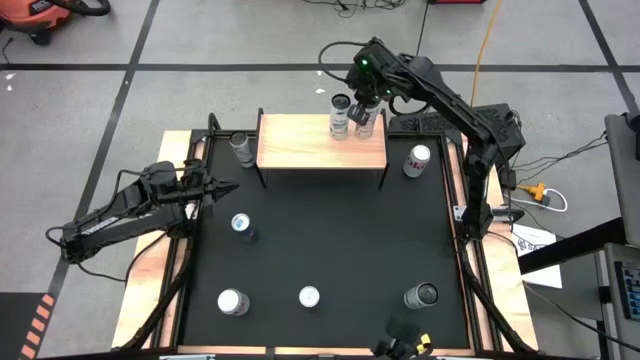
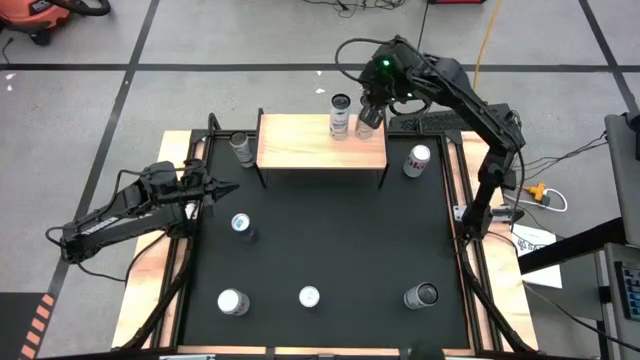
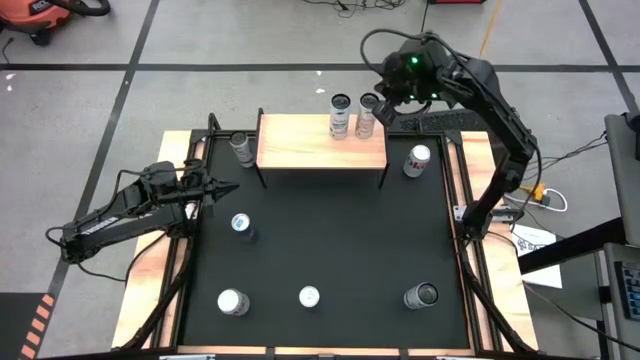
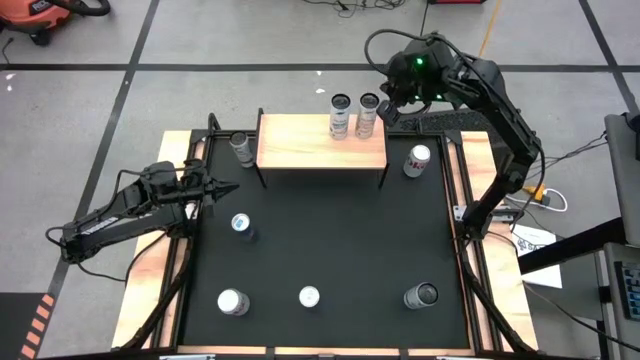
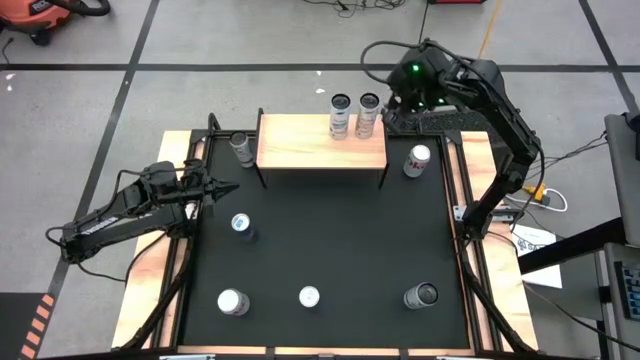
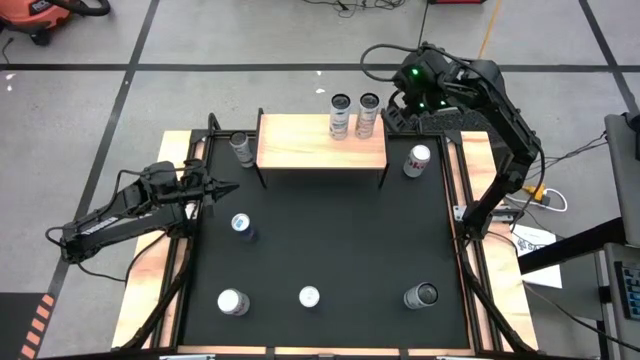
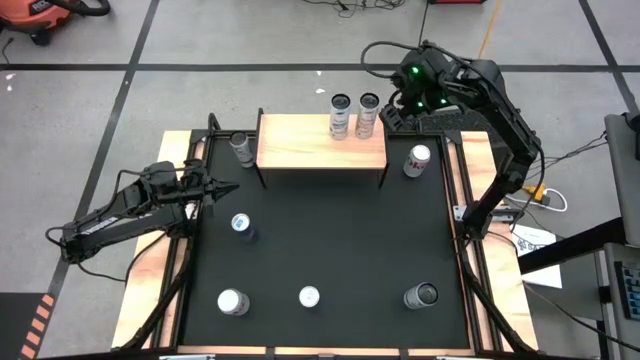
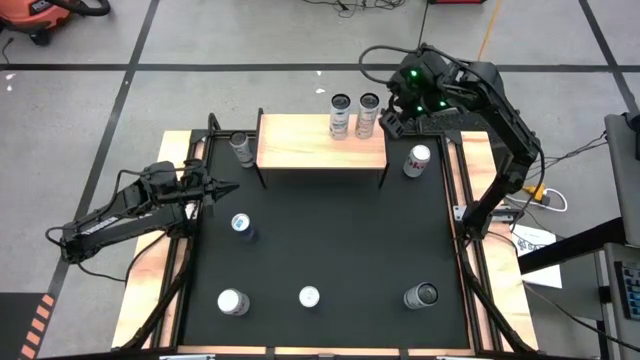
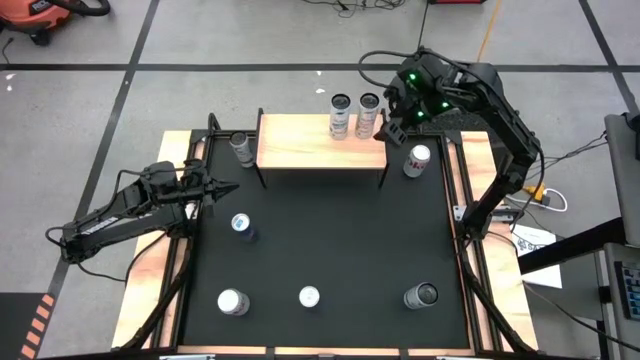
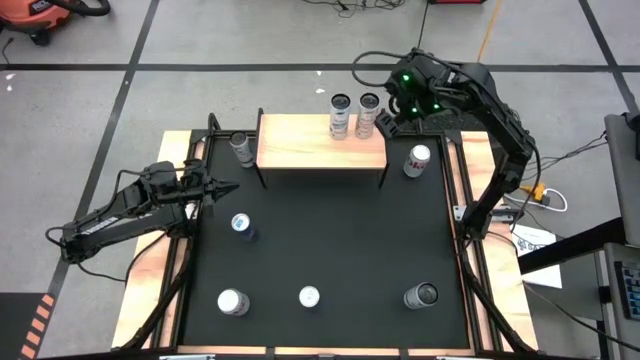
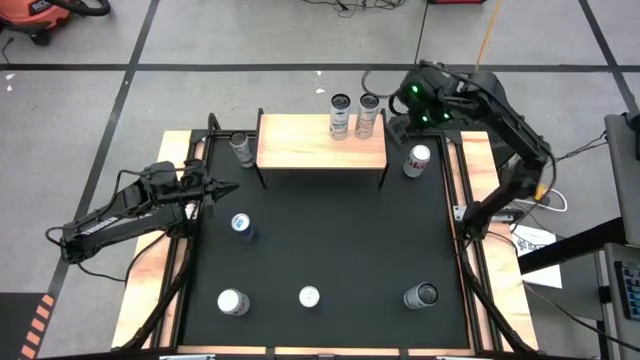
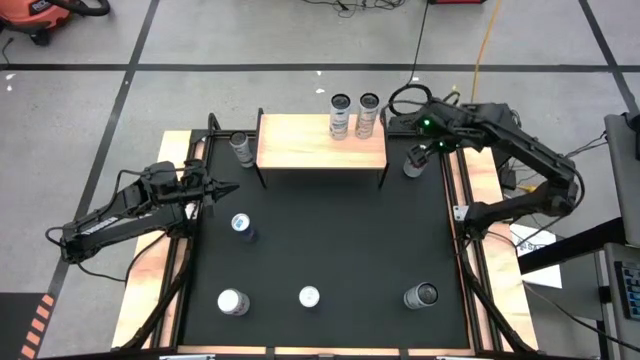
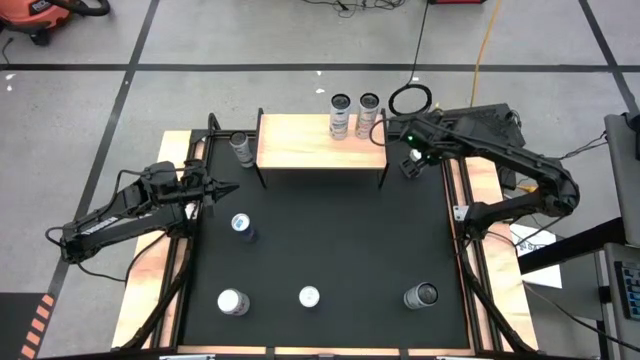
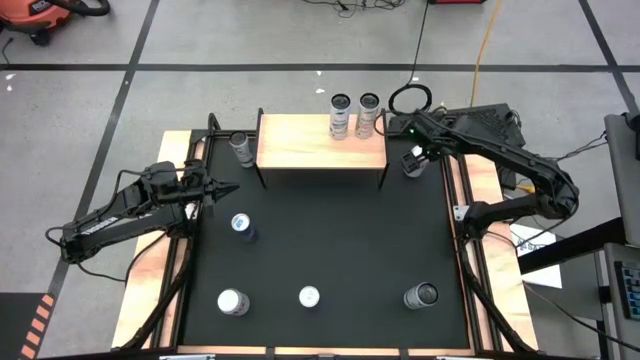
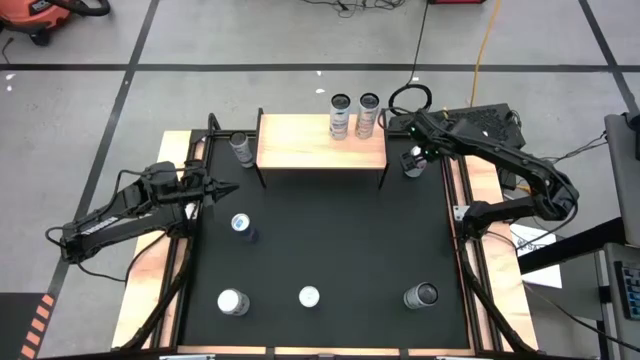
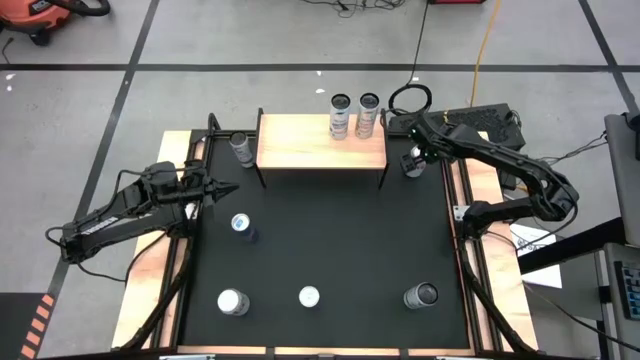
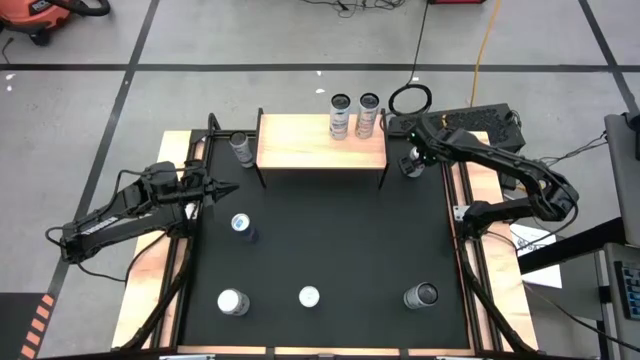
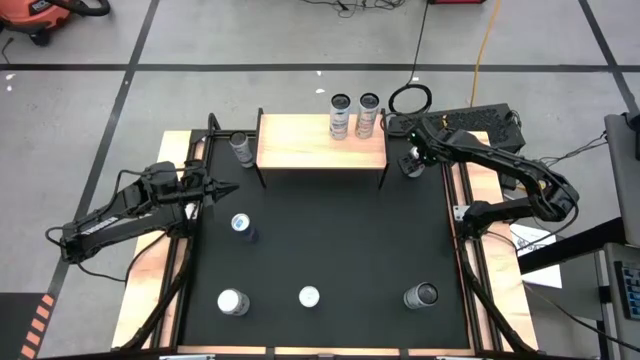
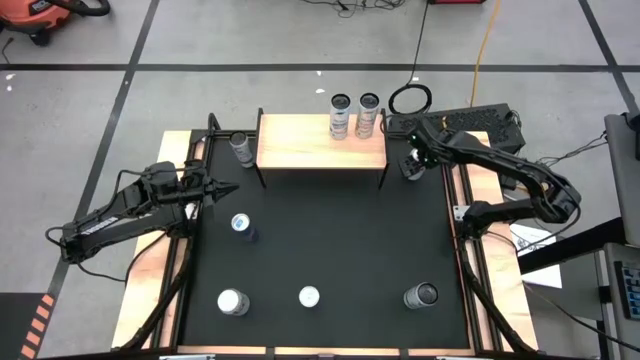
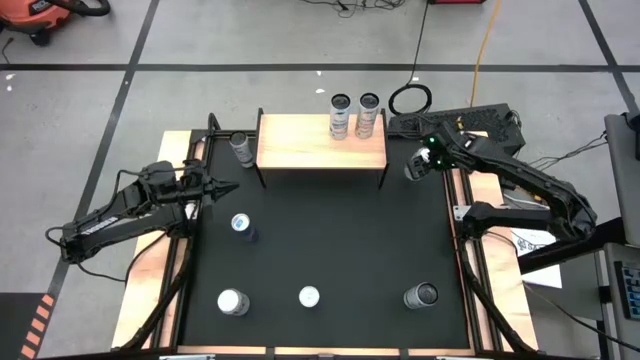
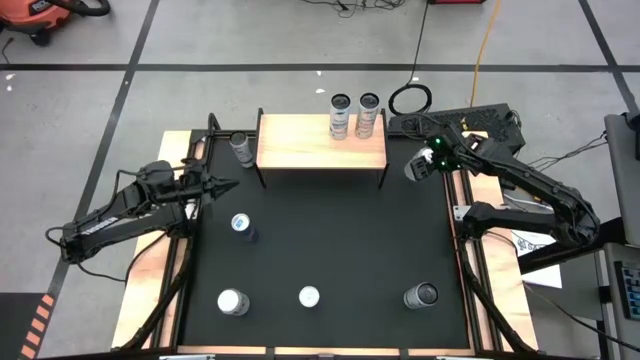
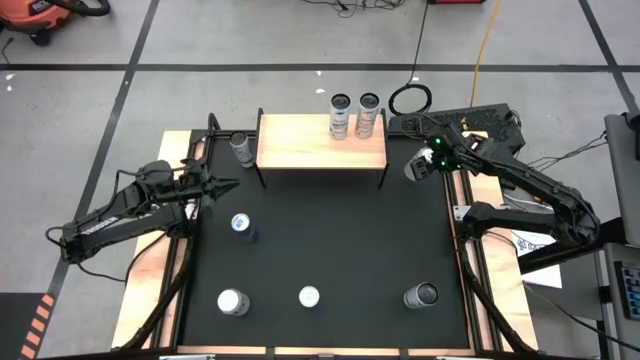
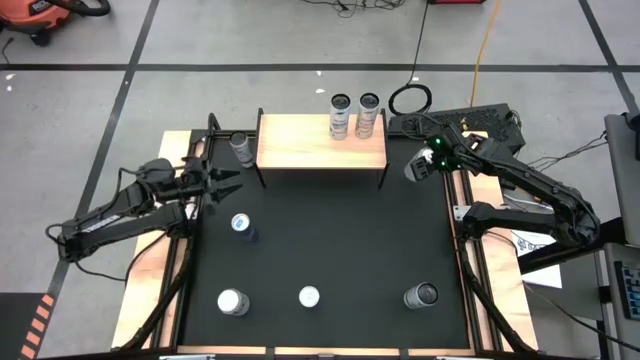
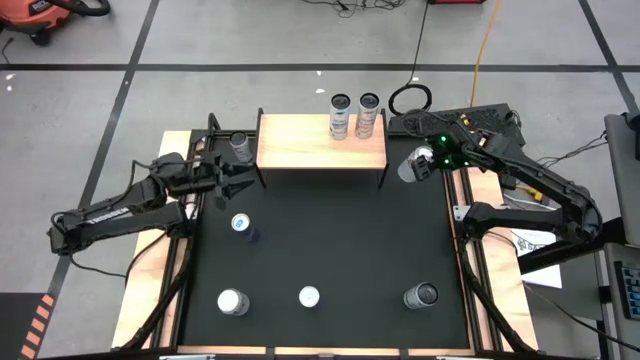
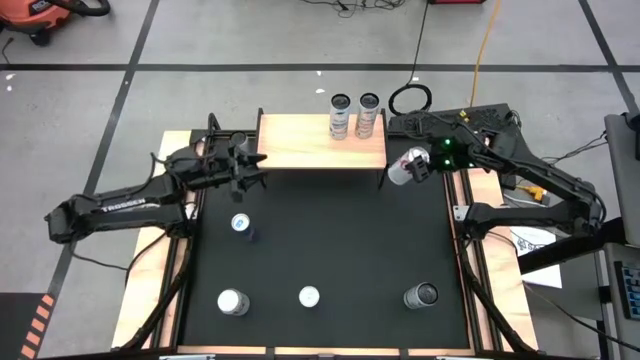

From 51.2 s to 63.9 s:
Task: Place canned beverage on shelf
Put the top red silver soda can on the shelf

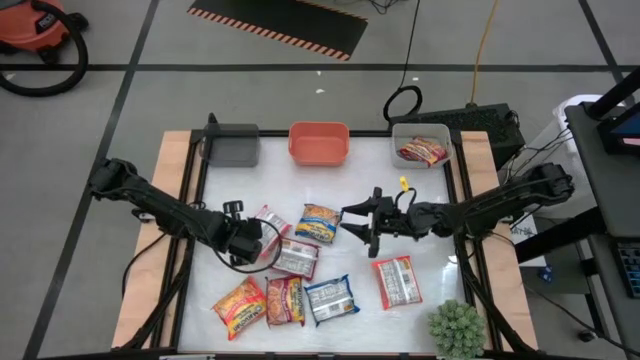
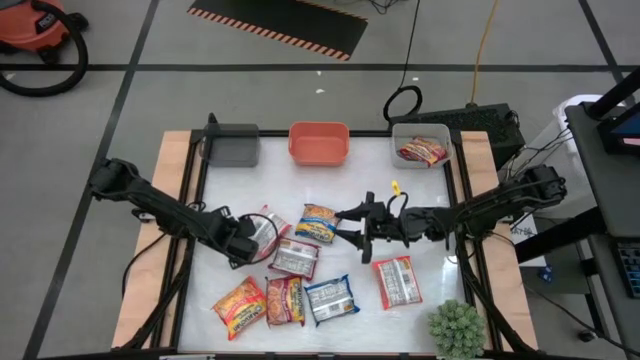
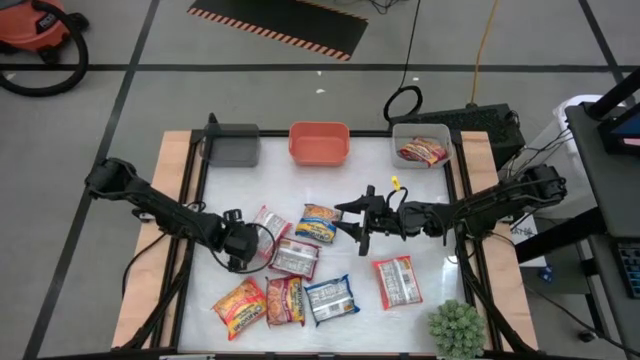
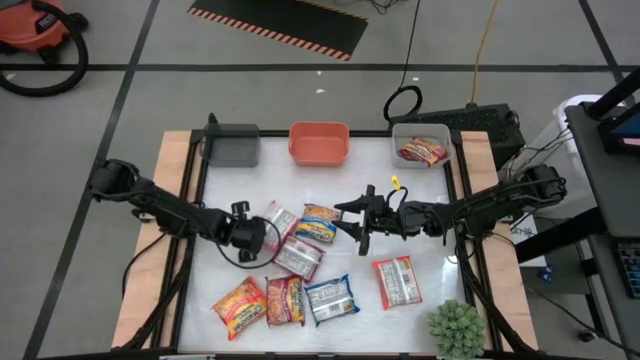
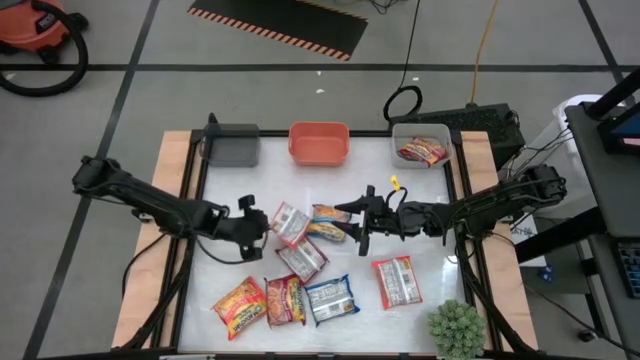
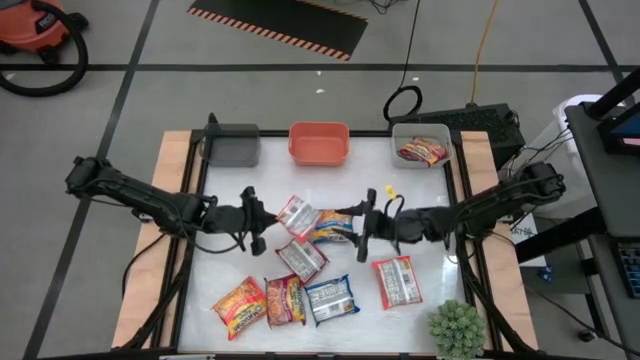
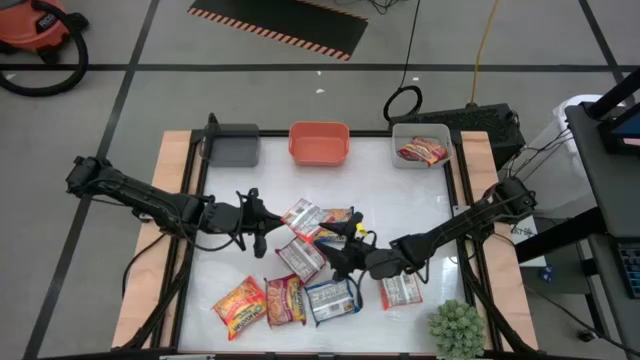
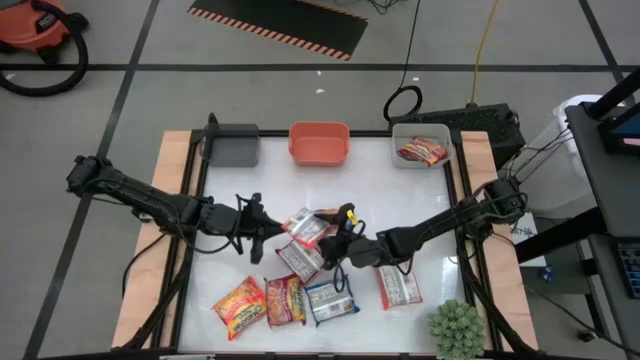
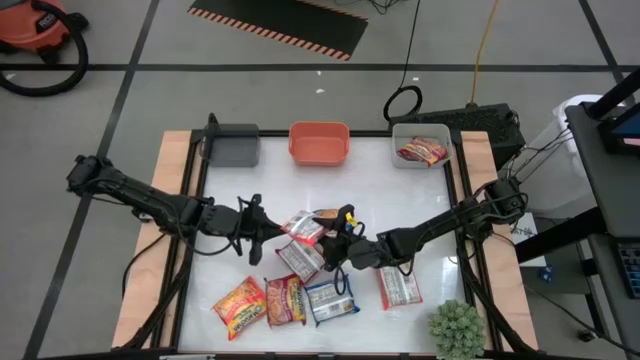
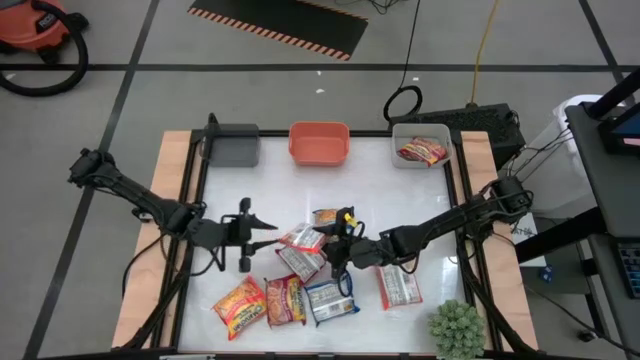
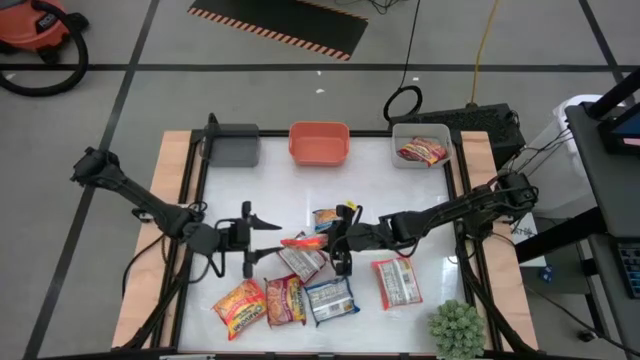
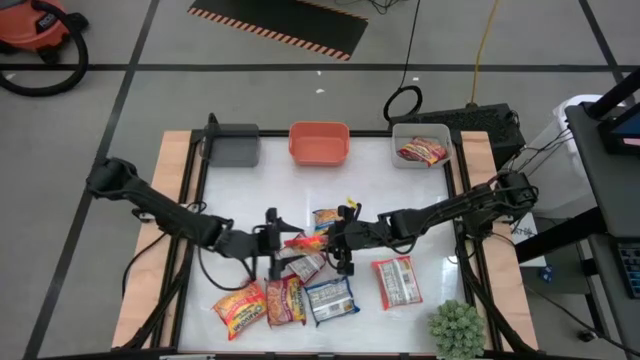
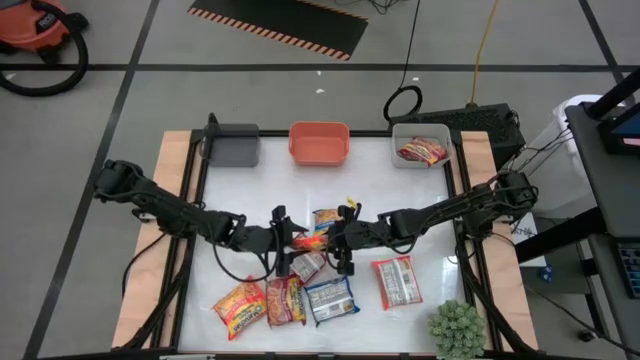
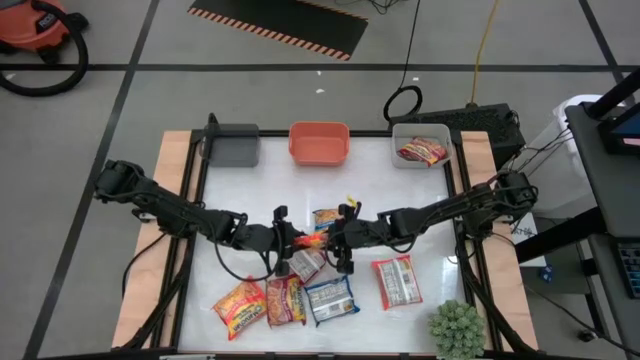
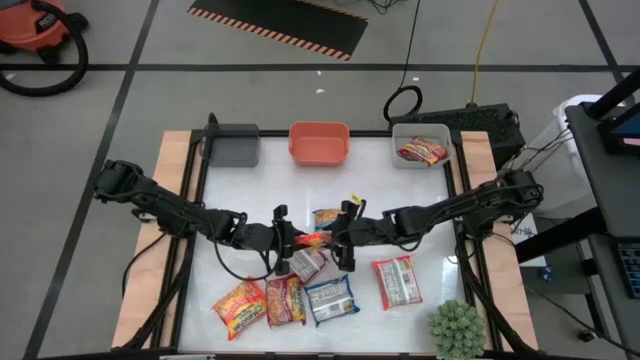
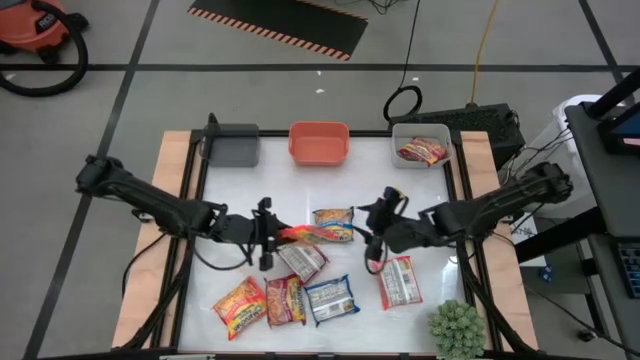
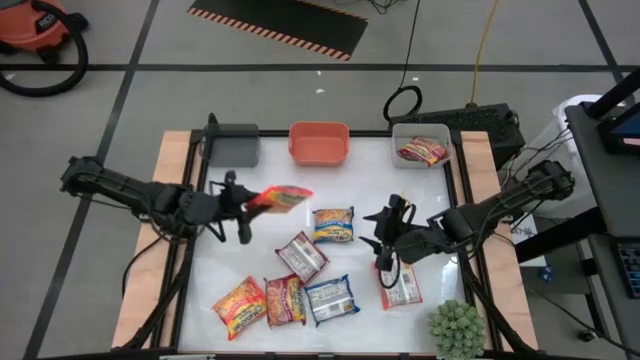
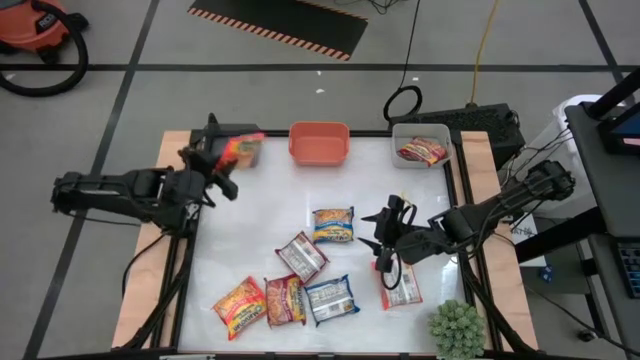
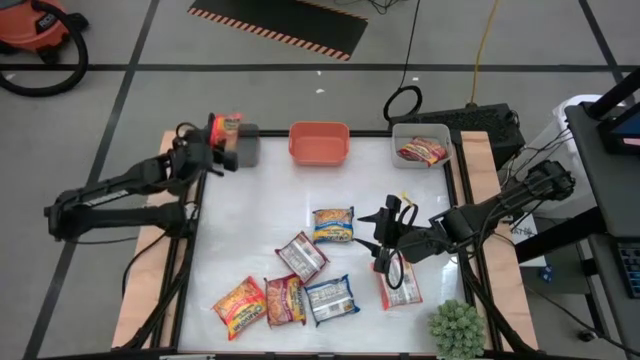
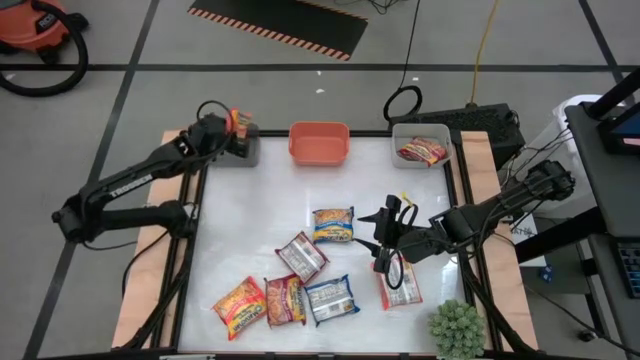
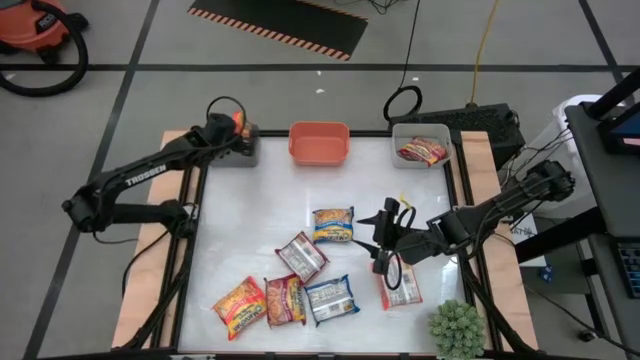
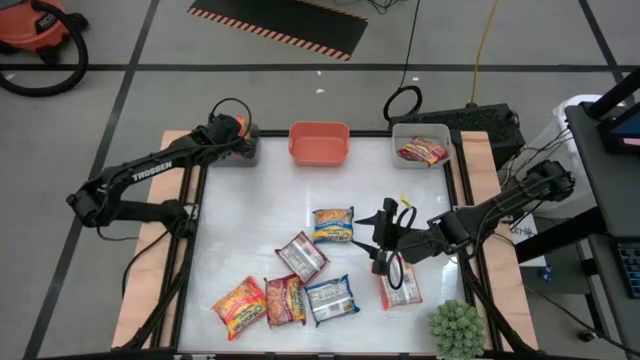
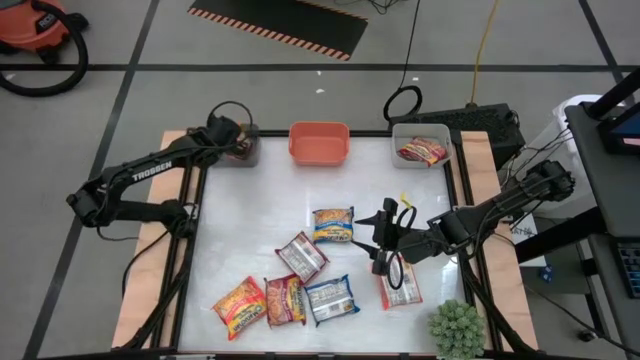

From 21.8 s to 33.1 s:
Task: Sort Maruchan noodles
Put the top left orange noodle pack into the black bin
